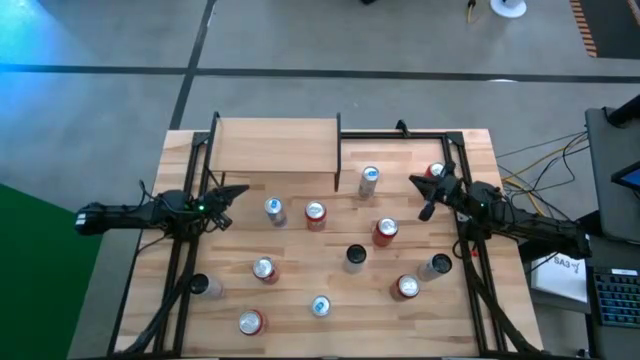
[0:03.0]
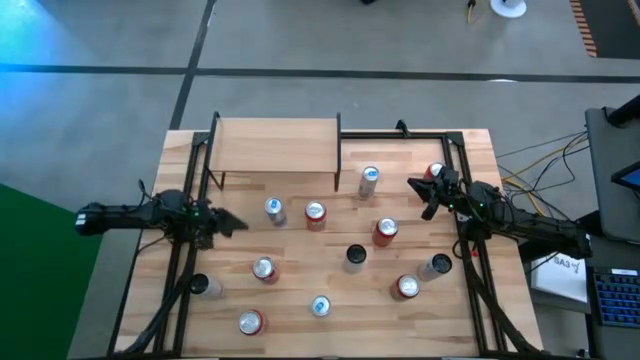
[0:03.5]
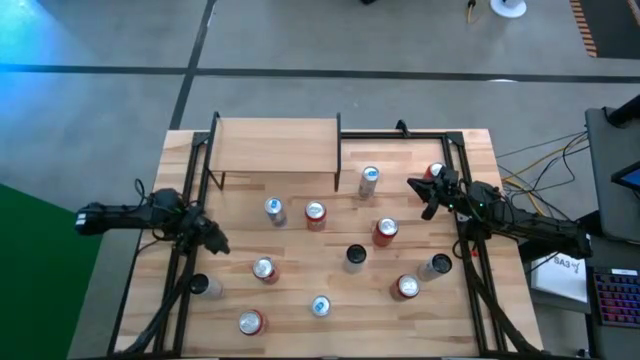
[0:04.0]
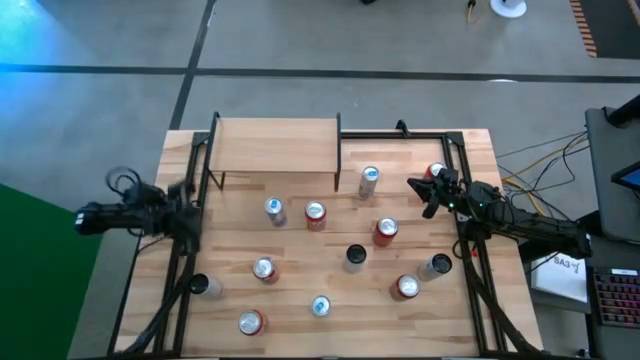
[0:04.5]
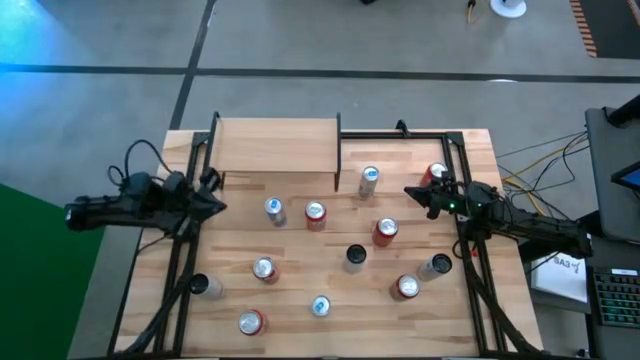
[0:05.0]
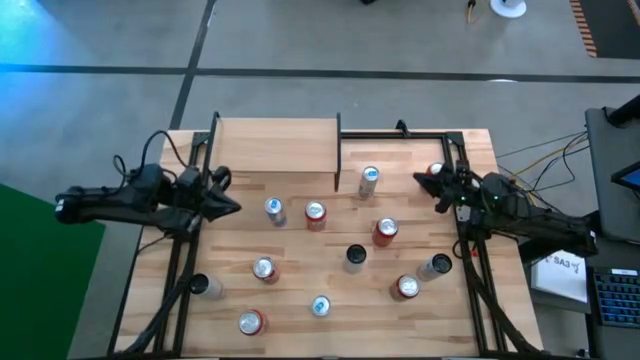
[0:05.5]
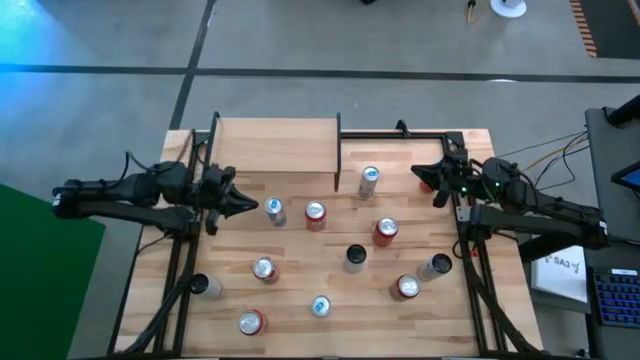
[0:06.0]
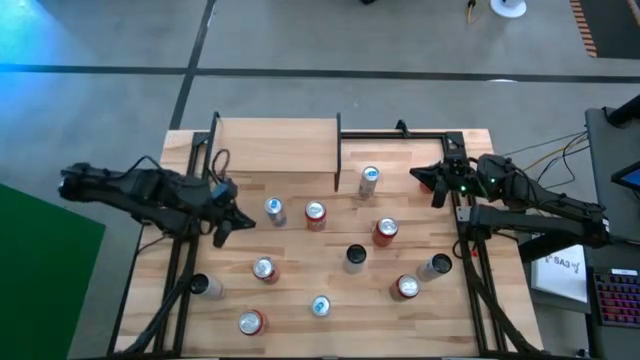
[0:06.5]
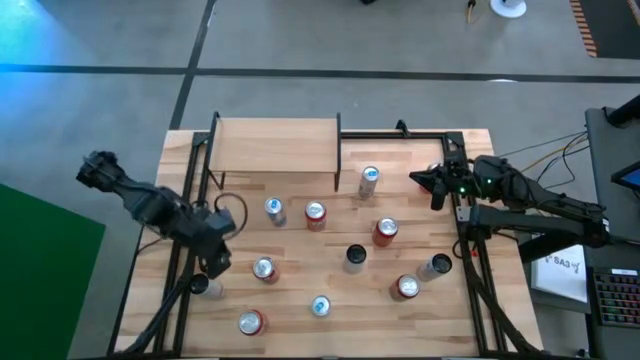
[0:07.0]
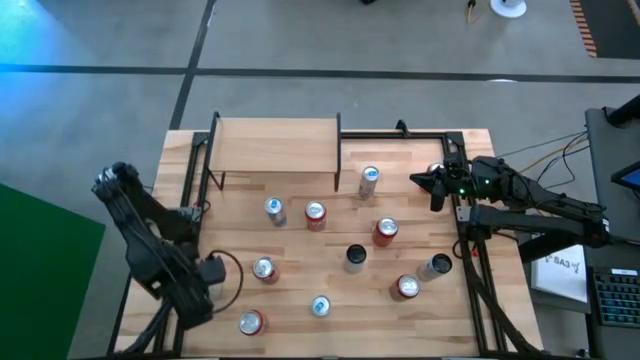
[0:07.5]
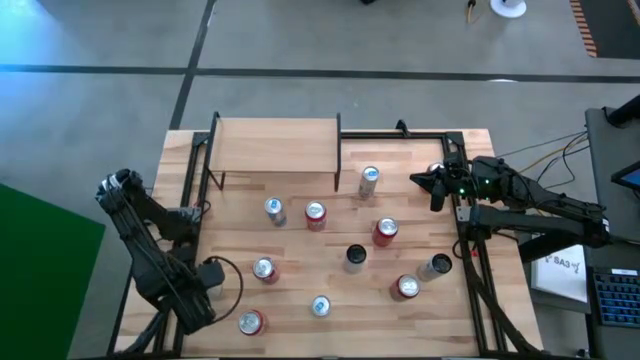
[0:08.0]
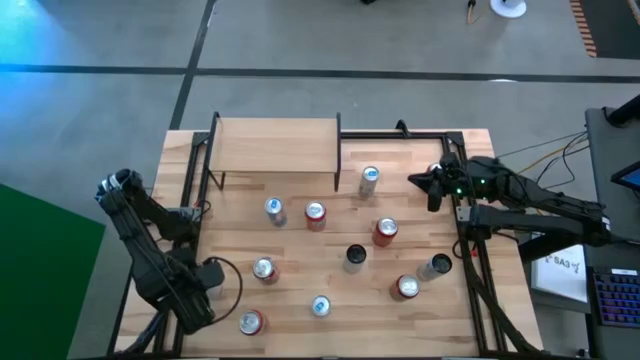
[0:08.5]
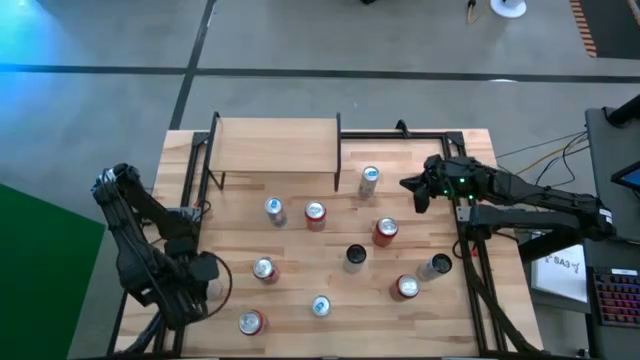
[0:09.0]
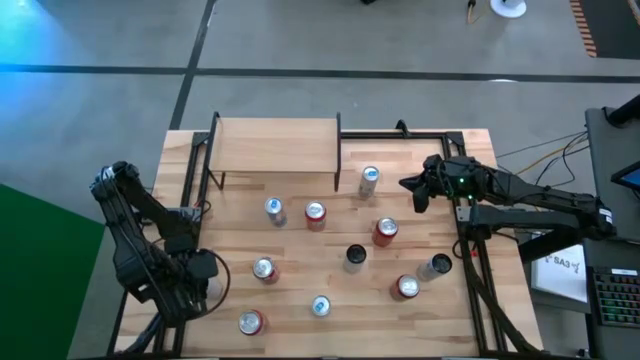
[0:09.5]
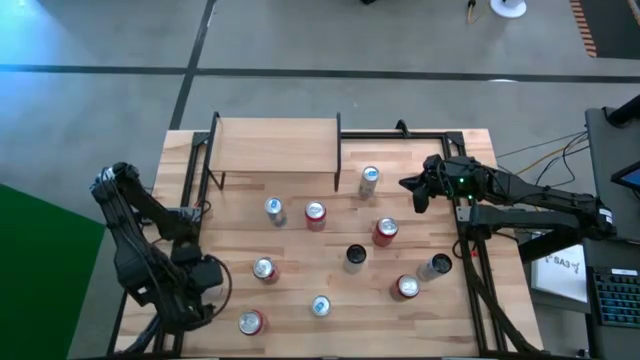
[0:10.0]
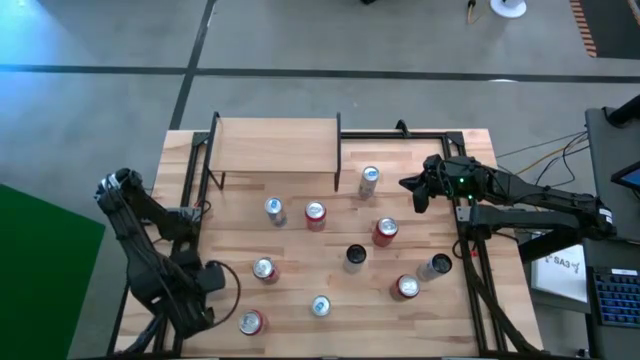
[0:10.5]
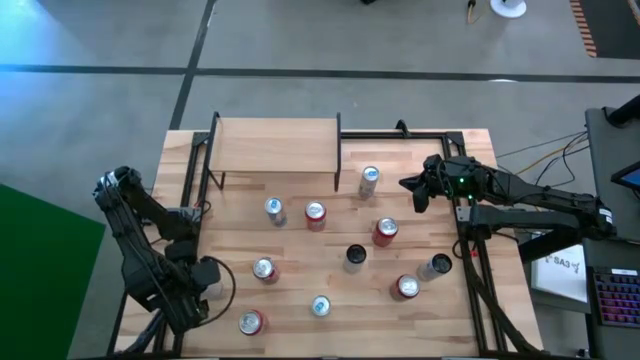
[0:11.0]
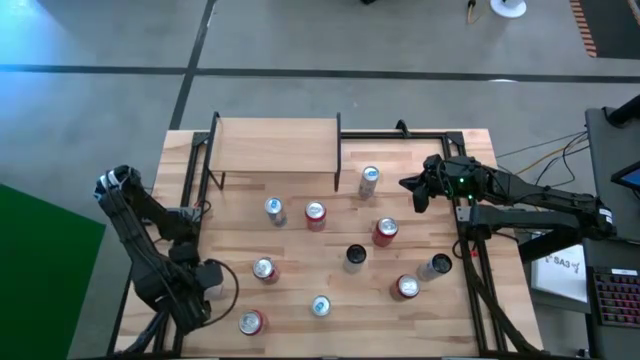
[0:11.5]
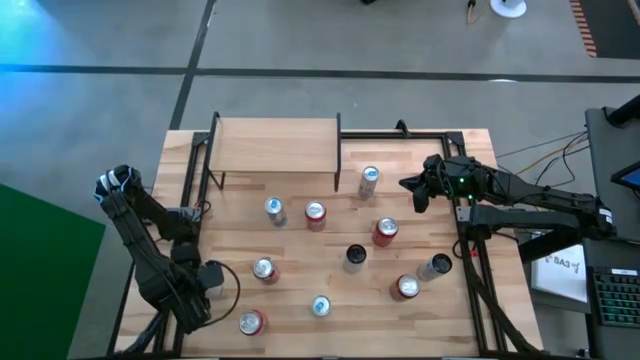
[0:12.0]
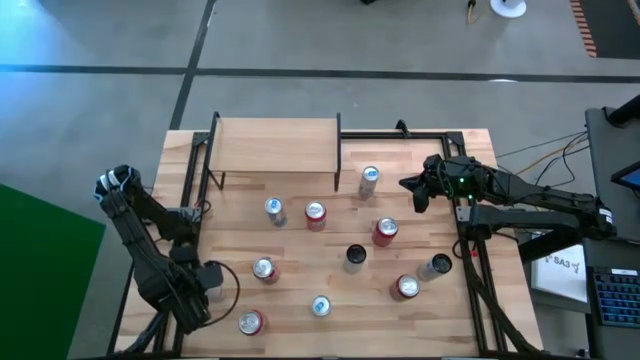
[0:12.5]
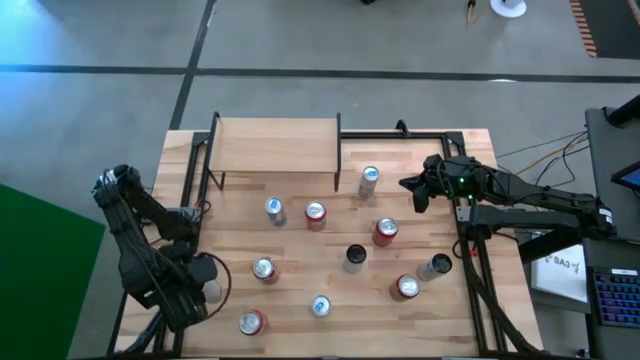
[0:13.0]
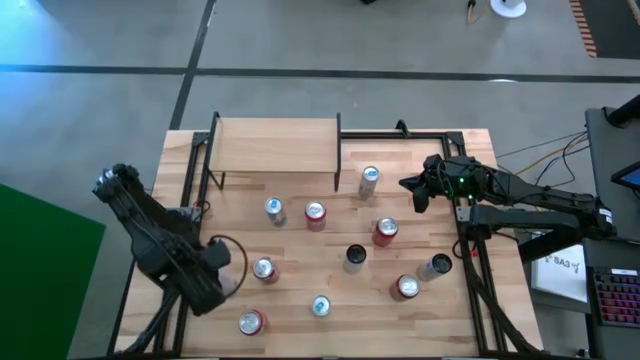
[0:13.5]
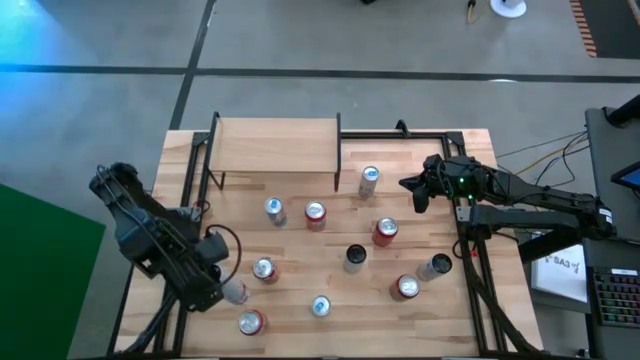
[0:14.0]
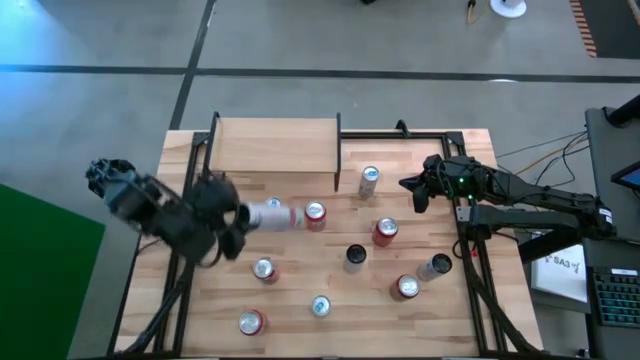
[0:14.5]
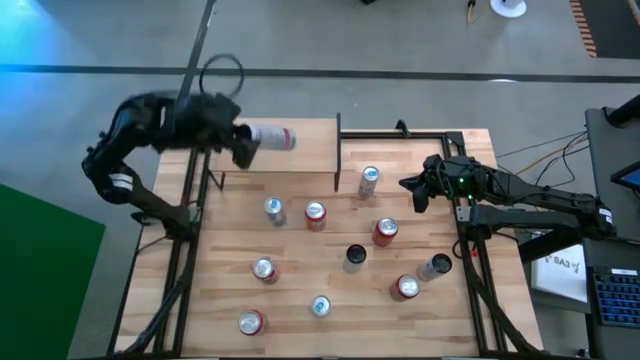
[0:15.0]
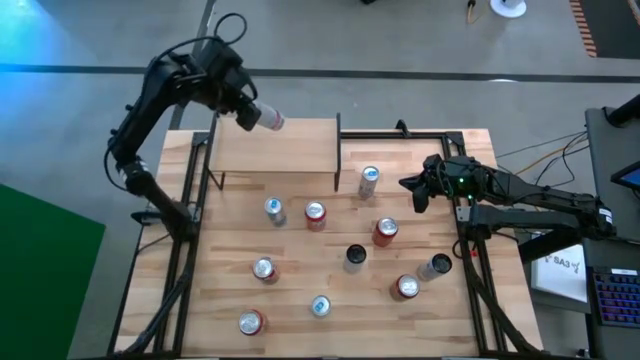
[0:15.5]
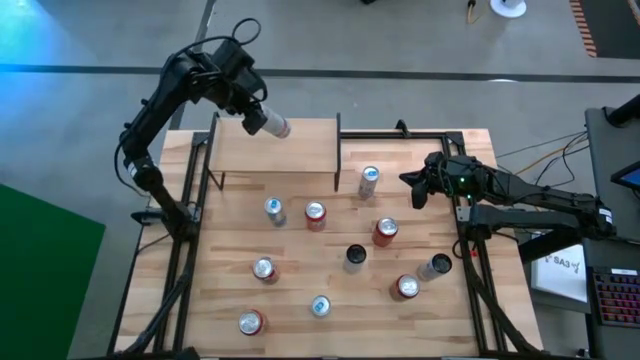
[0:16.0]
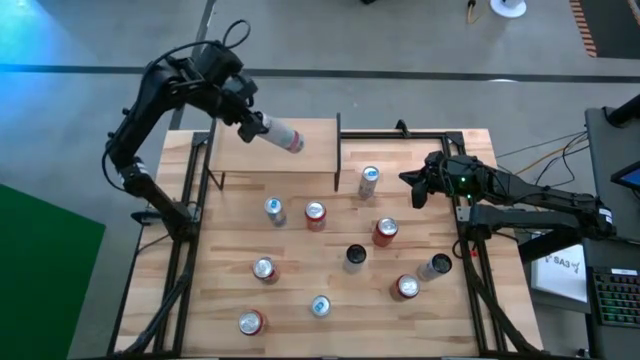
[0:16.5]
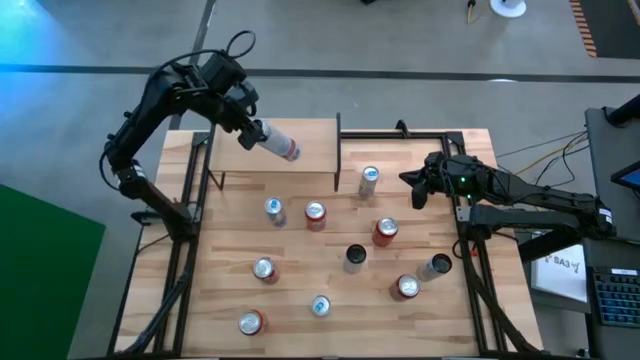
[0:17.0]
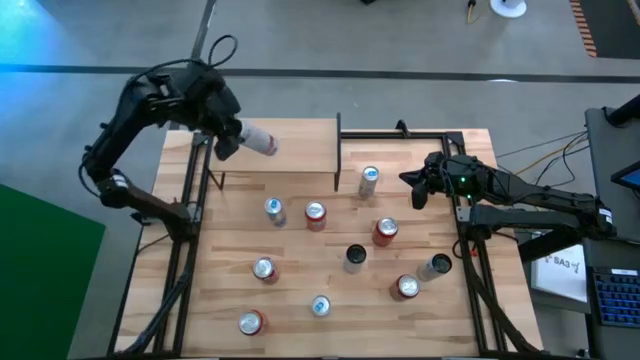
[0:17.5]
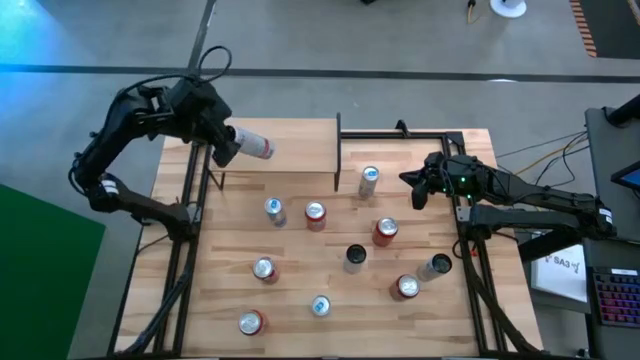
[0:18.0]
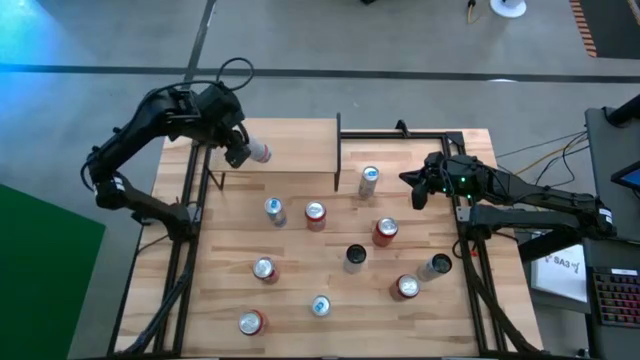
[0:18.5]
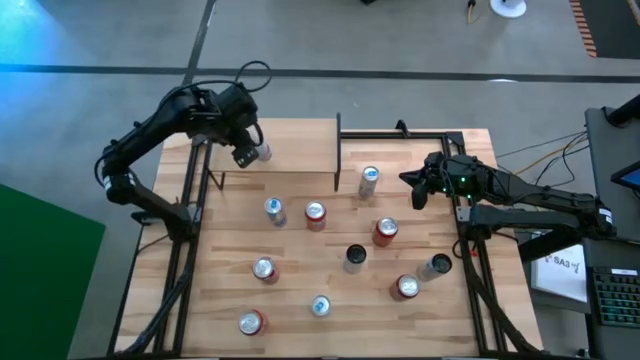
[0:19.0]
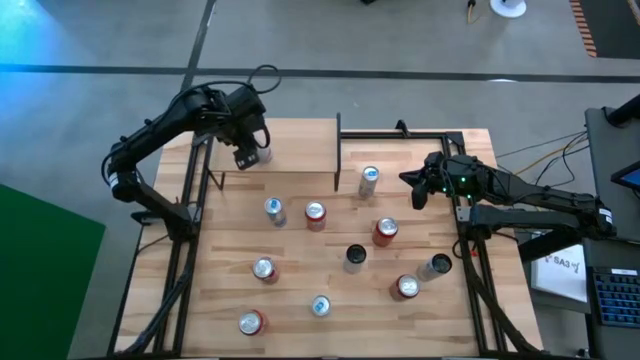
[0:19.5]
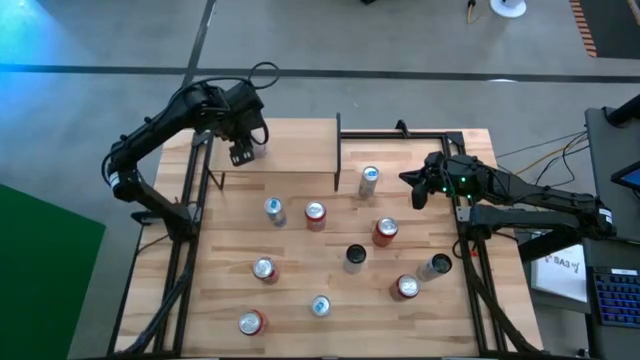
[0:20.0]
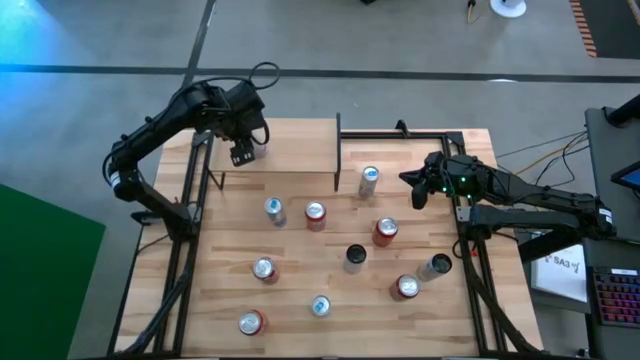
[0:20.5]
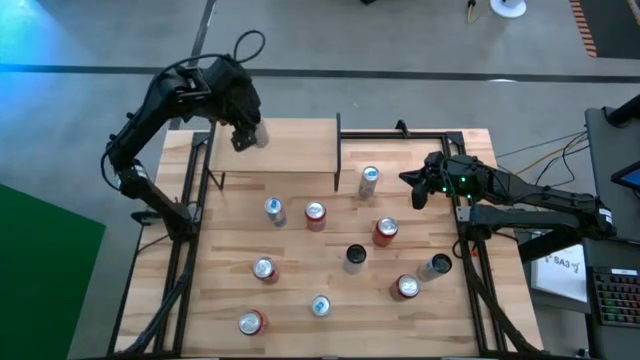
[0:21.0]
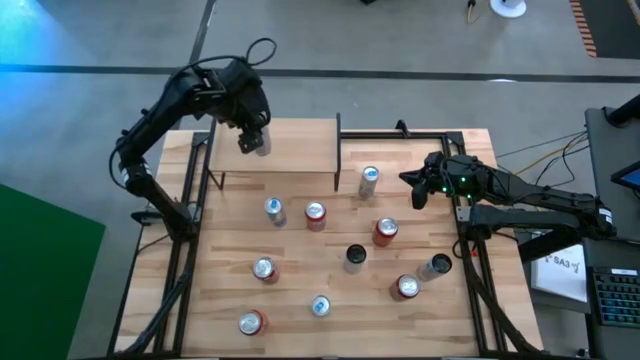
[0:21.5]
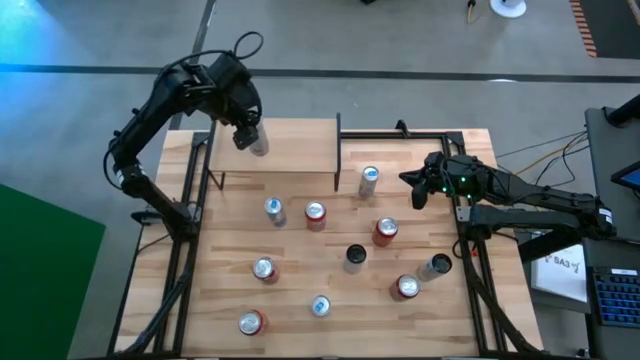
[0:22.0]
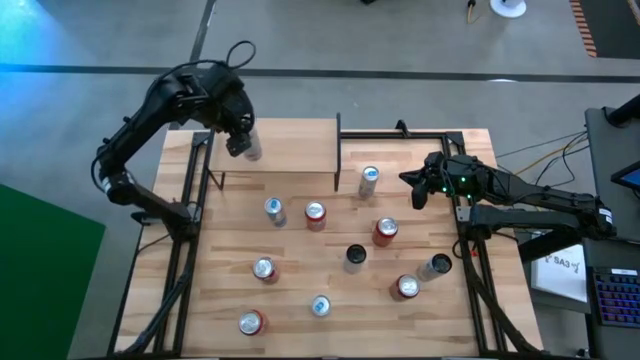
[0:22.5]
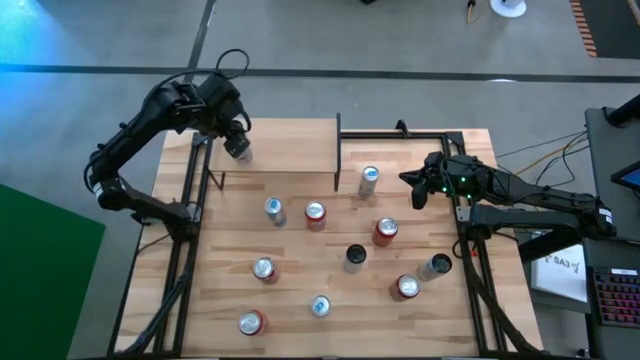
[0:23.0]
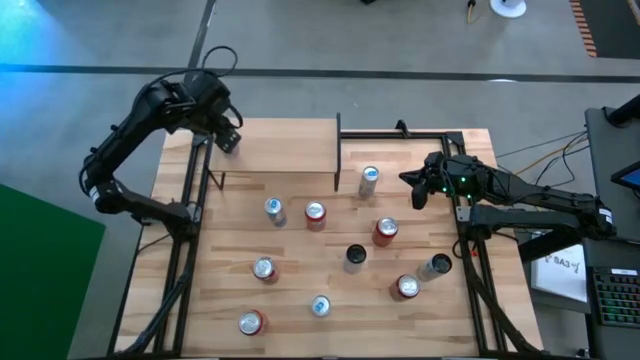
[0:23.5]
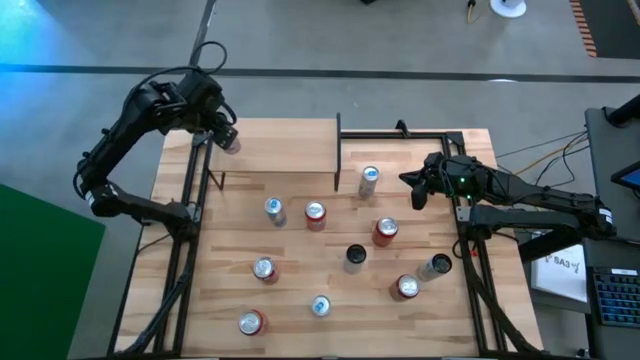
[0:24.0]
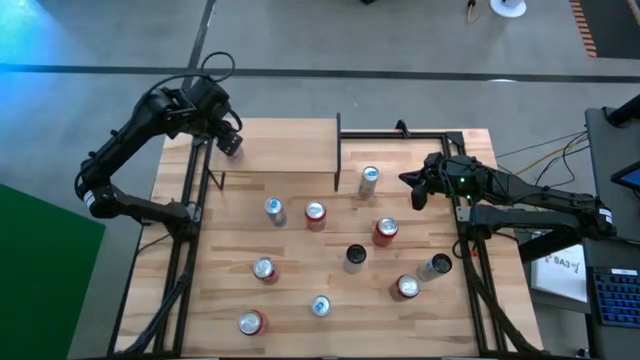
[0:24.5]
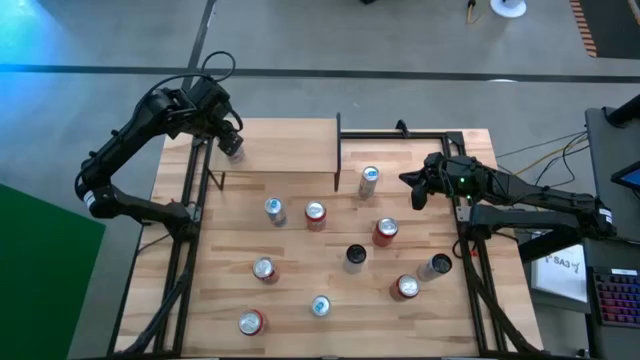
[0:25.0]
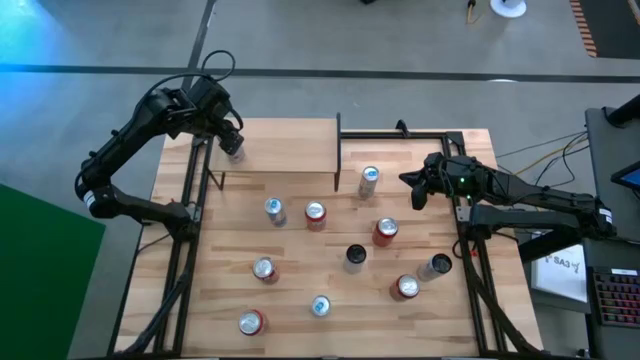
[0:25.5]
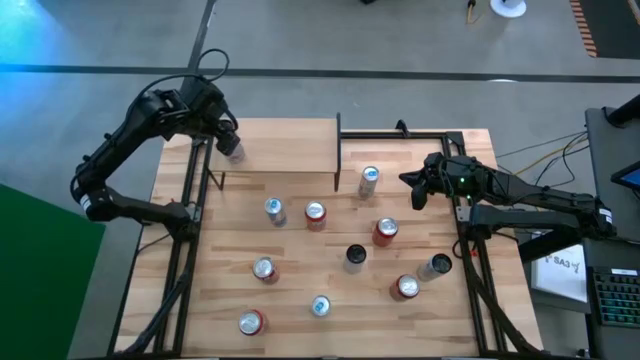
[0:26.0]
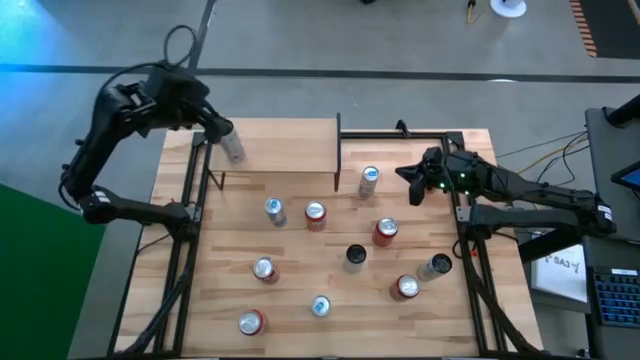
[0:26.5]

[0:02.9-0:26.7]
Task: Place canned beverage on shelf
Put the white pink soda can on the shelf
